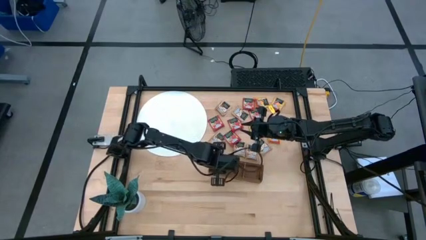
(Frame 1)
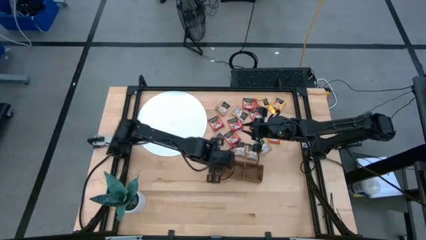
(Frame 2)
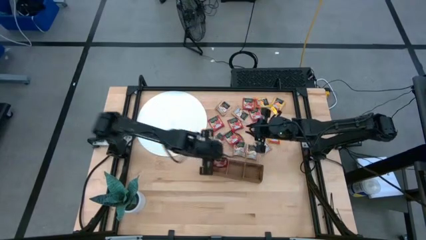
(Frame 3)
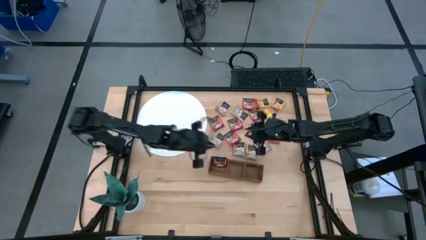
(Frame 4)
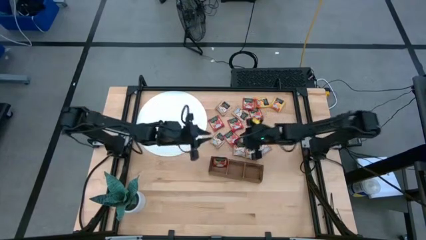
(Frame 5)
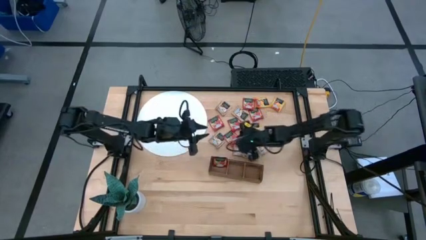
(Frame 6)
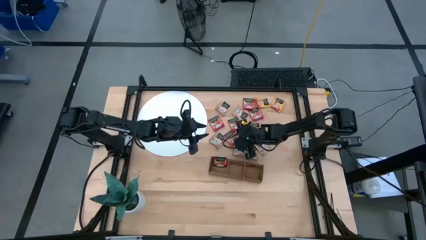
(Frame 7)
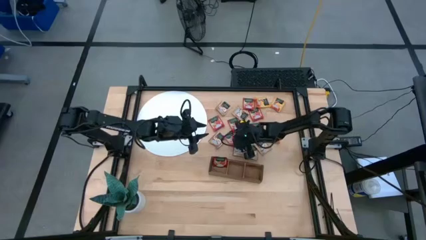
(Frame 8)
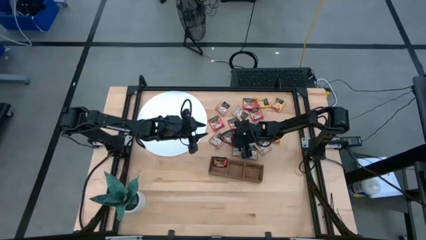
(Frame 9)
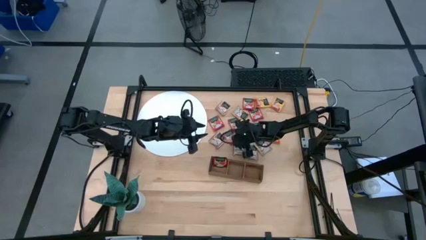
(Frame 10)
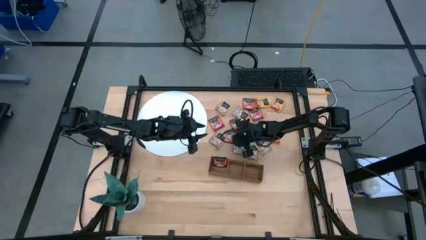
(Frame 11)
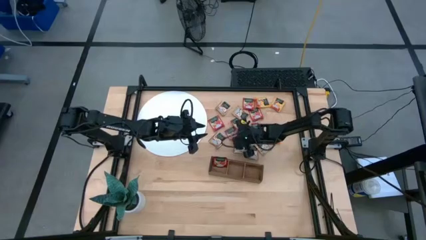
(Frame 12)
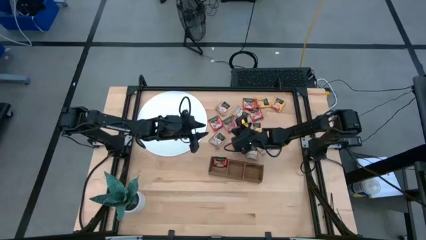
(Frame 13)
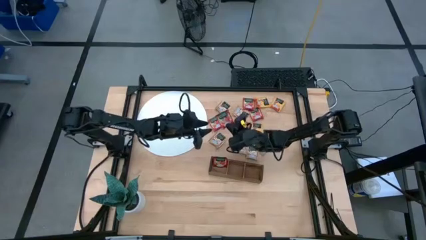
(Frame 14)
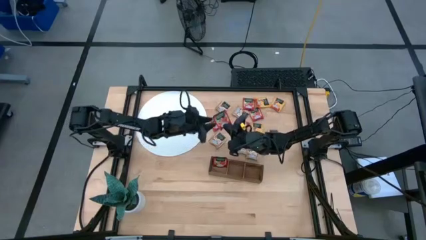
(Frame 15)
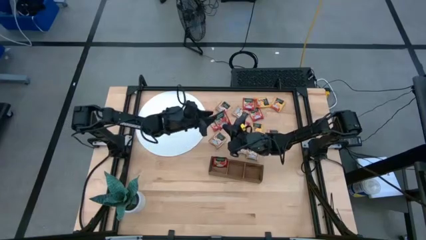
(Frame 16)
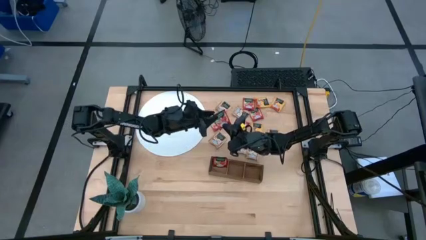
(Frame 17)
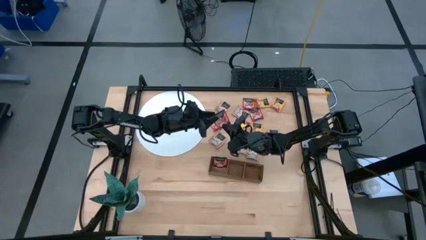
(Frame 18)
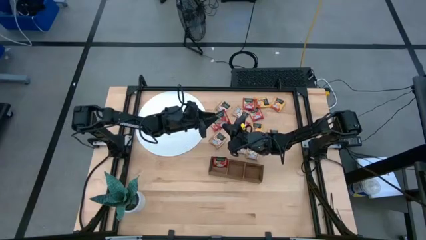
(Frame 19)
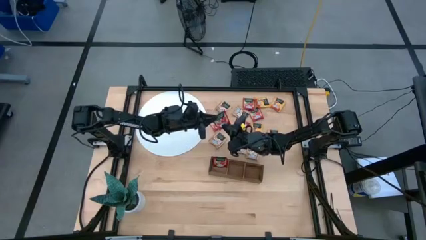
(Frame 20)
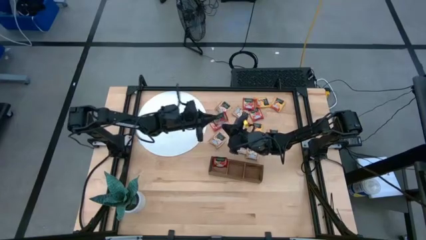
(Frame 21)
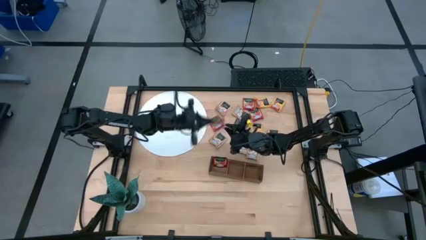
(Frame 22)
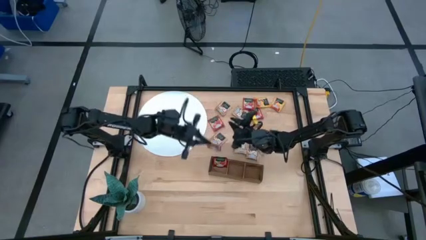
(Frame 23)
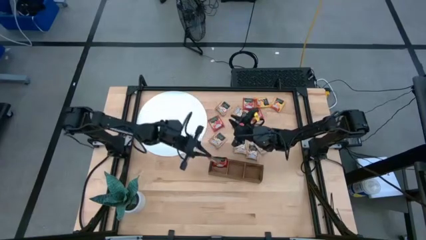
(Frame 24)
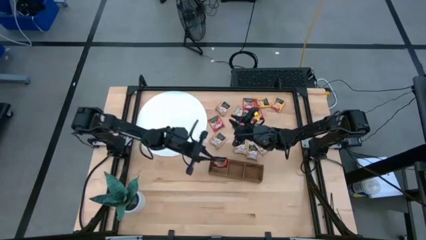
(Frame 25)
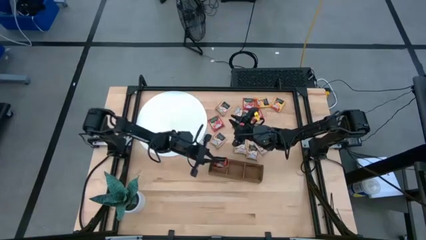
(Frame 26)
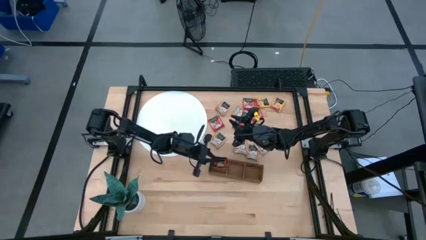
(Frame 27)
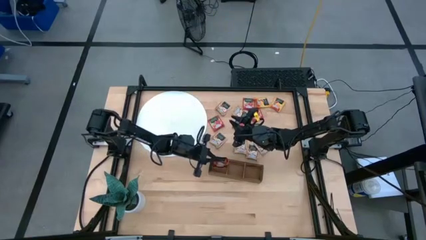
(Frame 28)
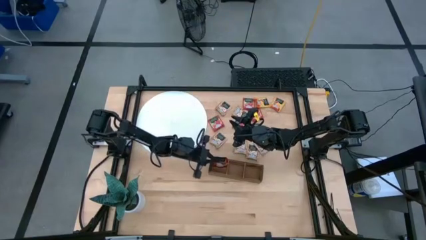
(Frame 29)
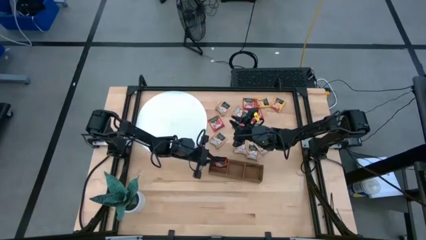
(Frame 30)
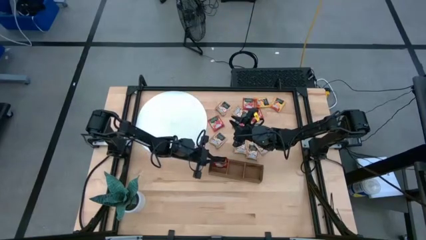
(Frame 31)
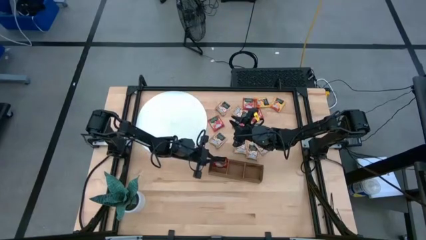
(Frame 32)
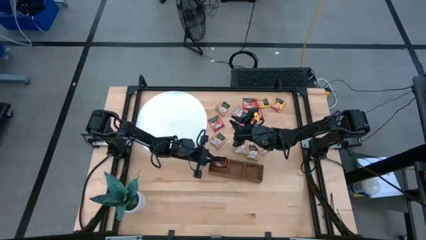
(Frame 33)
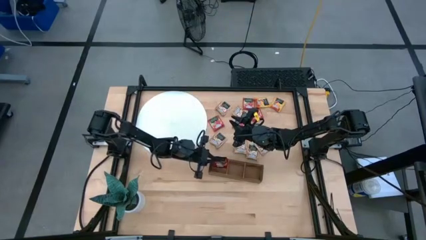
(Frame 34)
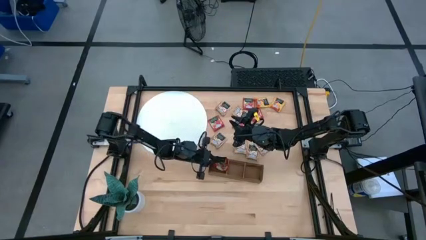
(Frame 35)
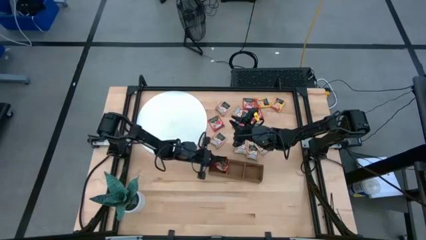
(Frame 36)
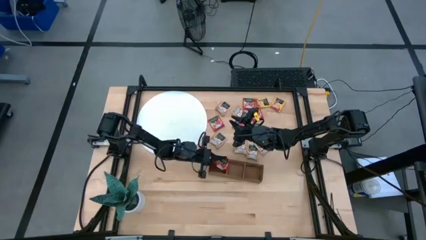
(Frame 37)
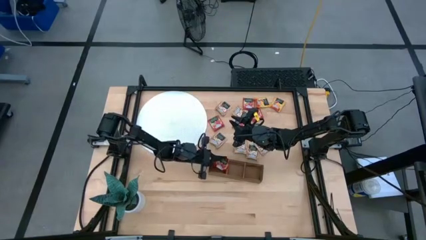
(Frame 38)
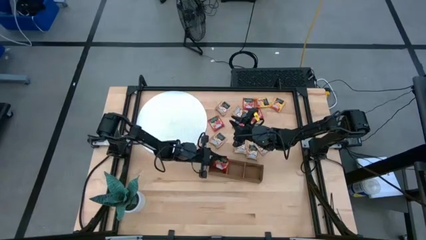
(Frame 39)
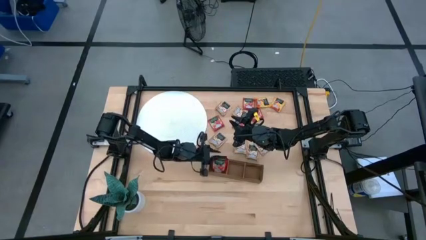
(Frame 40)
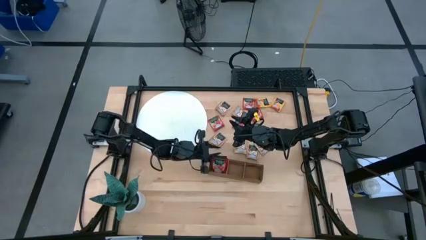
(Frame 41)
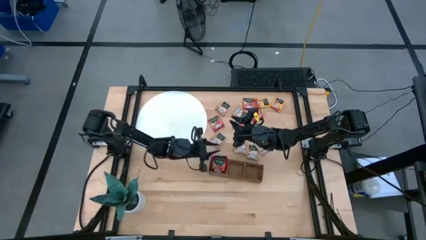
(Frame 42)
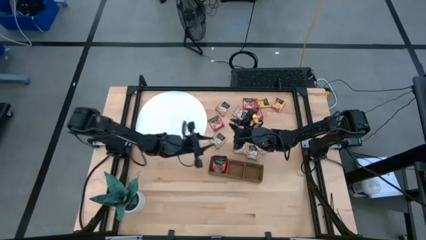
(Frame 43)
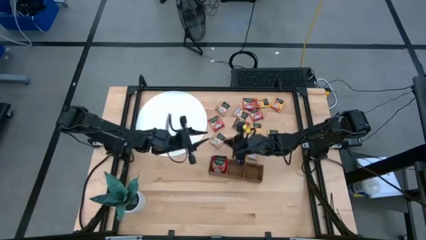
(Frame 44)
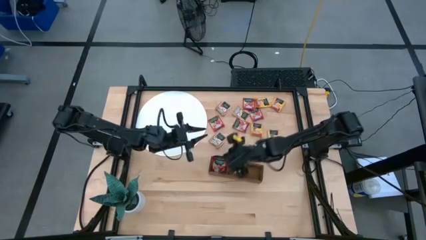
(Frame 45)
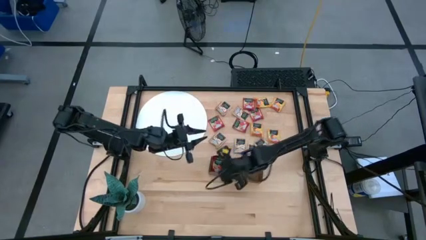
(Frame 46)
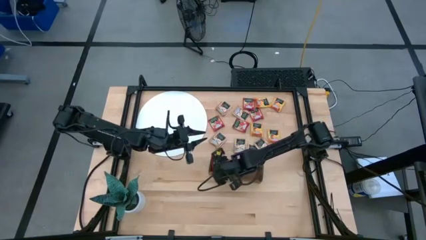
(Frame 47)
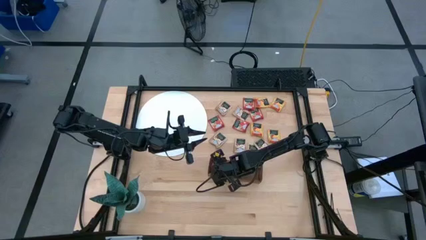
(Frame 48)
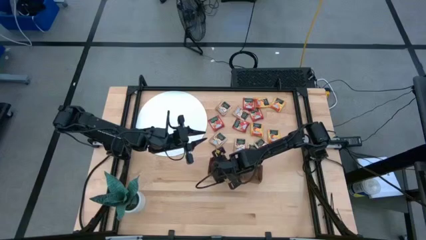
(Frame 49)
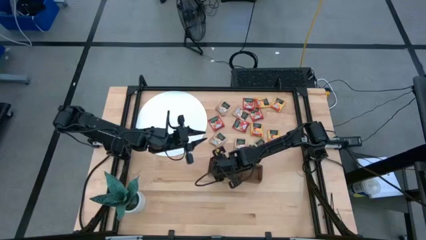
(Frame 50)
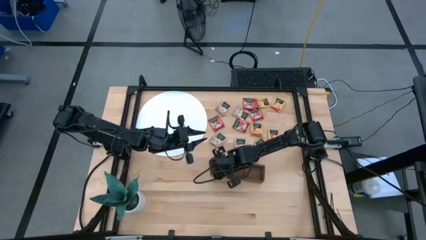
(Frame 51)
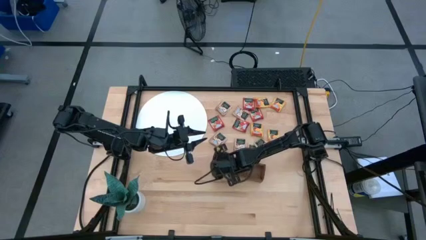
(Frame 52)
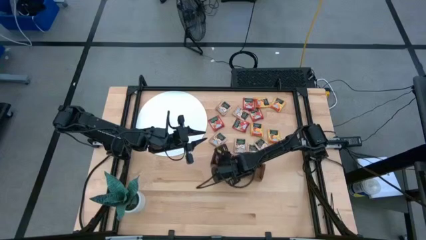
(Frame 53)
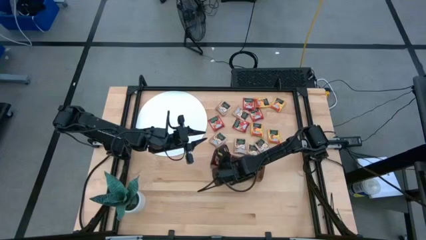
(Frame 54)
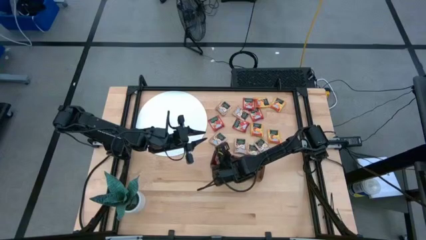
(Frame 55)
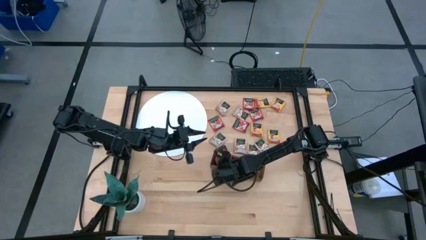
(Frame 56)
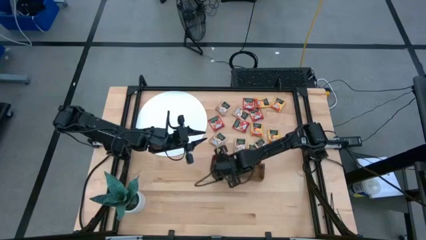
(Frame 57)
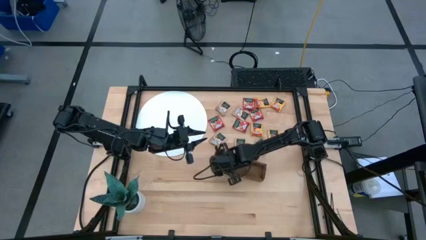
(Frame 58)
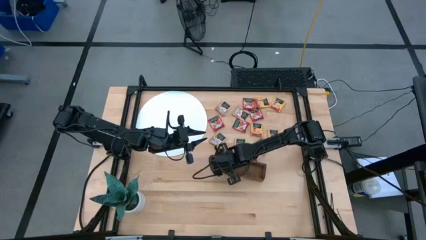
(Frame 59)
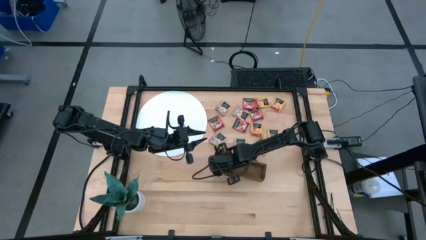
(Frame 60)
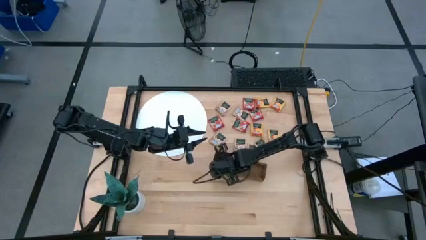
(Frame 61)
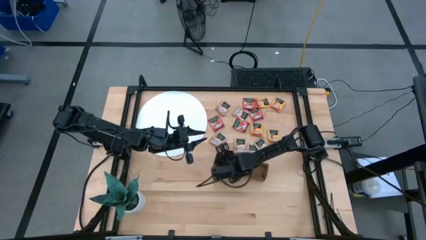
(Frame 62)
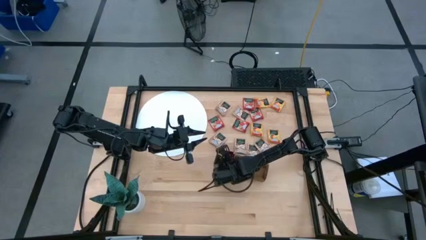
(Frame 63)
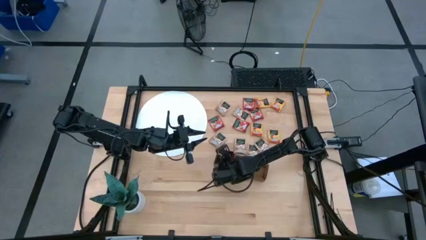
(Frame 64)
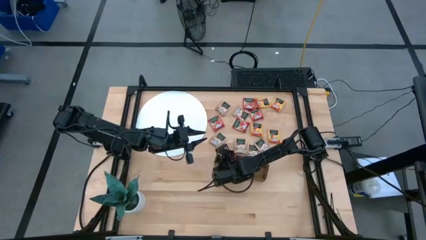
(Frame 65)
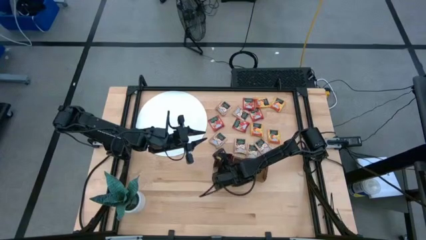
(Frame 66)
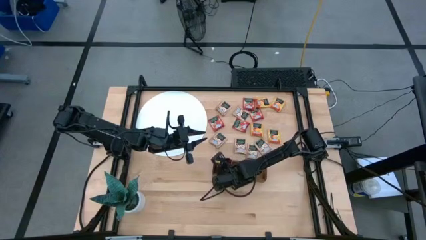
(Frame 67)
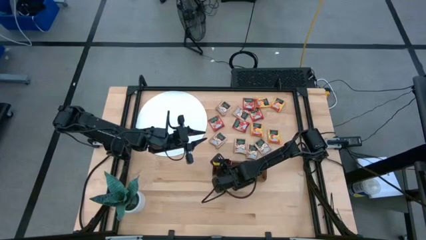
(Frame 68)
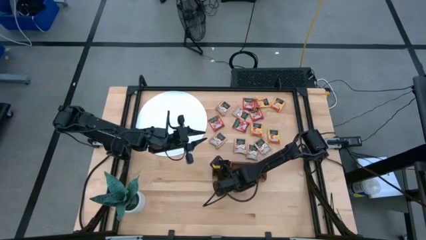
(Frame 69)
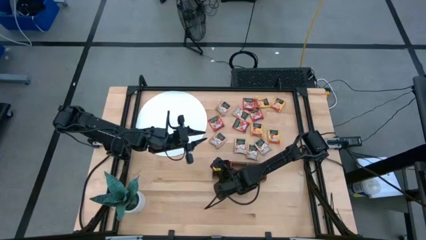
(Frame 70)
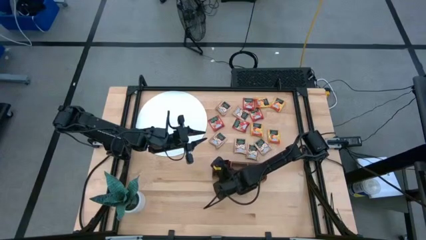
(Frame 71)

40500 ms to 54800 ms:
Task: Pick & Place Tea
Put the red tea bag into the left section of the wooden organizer
